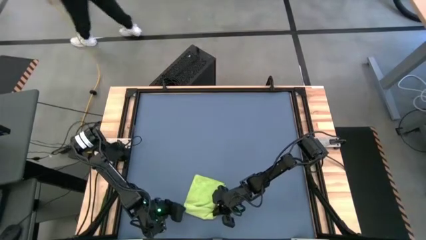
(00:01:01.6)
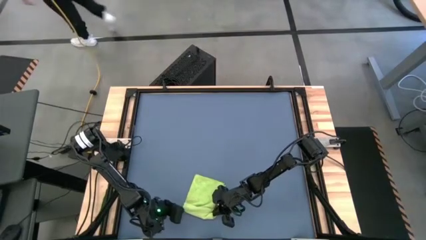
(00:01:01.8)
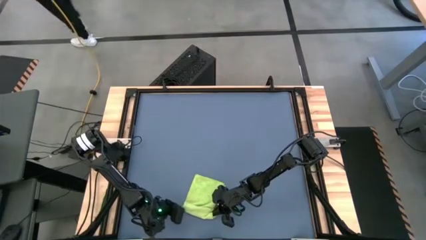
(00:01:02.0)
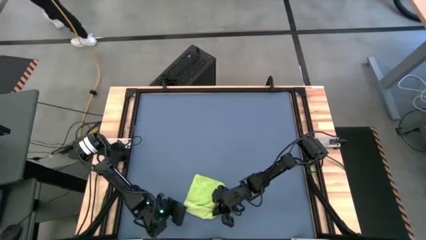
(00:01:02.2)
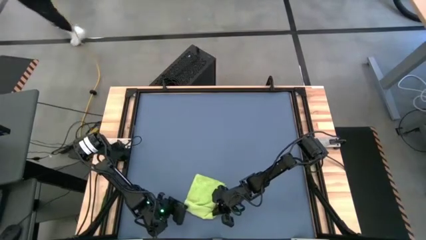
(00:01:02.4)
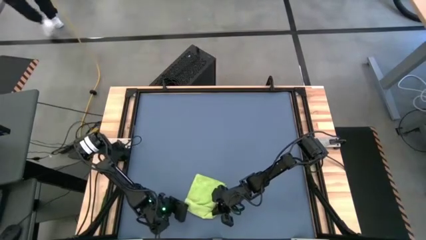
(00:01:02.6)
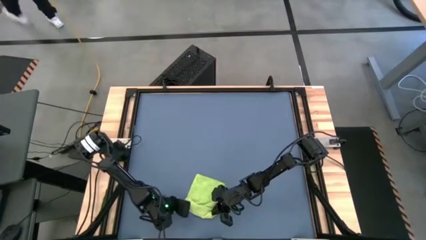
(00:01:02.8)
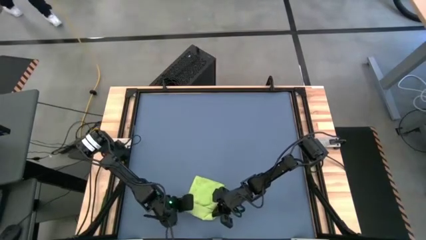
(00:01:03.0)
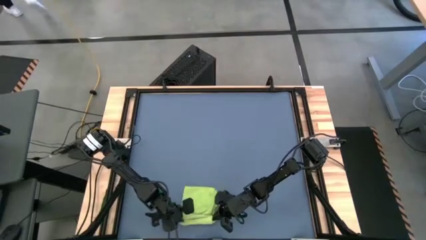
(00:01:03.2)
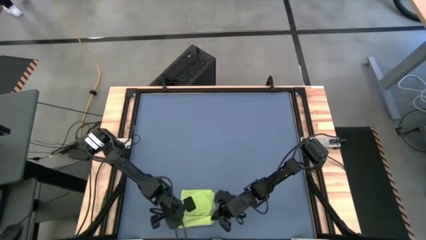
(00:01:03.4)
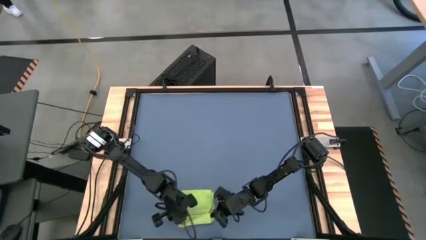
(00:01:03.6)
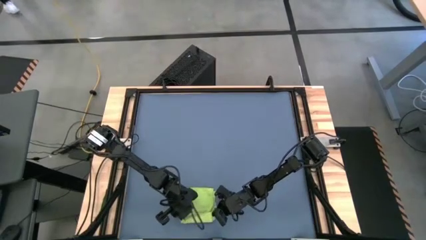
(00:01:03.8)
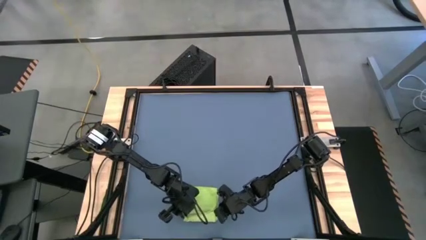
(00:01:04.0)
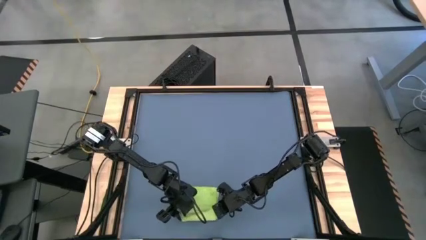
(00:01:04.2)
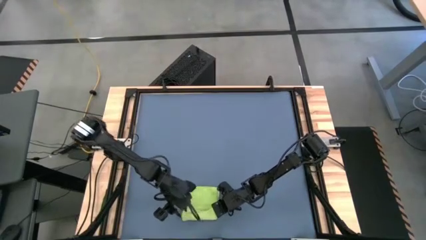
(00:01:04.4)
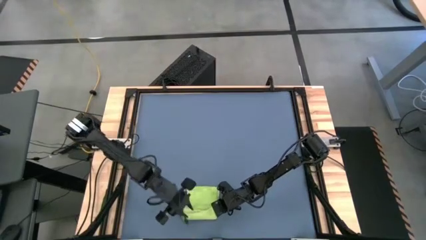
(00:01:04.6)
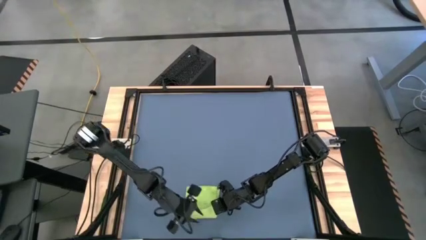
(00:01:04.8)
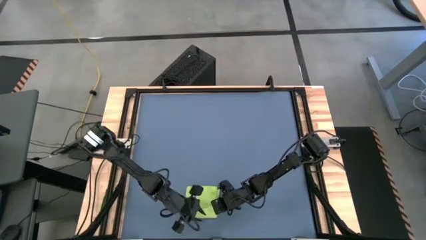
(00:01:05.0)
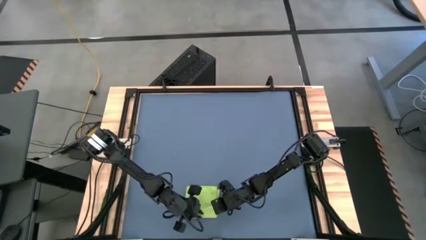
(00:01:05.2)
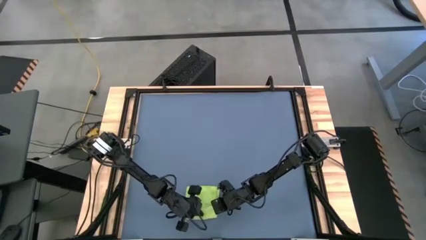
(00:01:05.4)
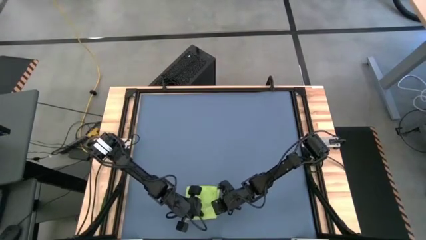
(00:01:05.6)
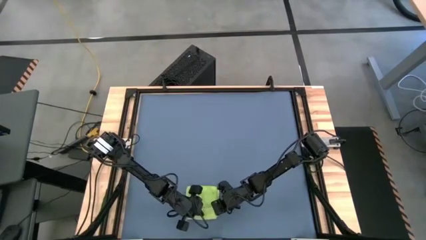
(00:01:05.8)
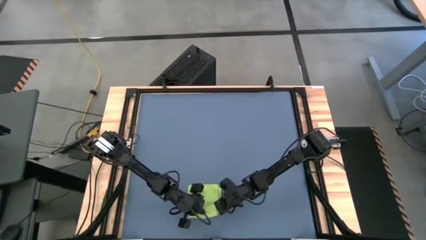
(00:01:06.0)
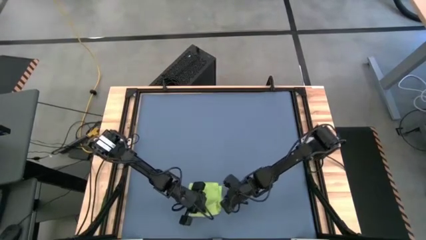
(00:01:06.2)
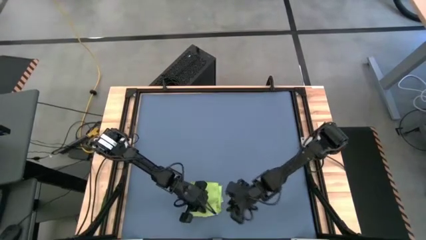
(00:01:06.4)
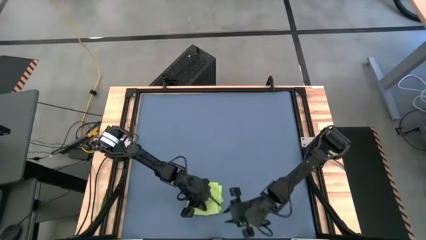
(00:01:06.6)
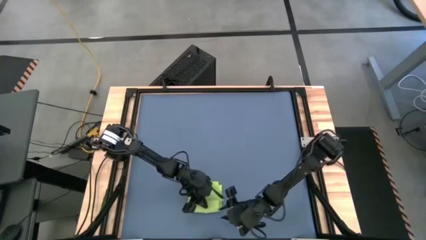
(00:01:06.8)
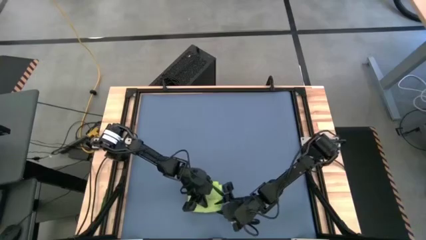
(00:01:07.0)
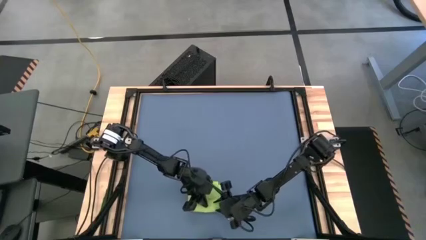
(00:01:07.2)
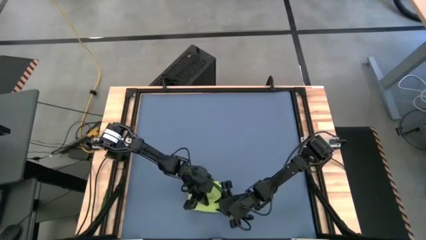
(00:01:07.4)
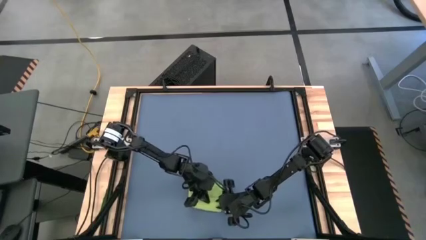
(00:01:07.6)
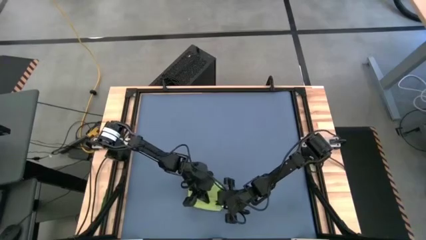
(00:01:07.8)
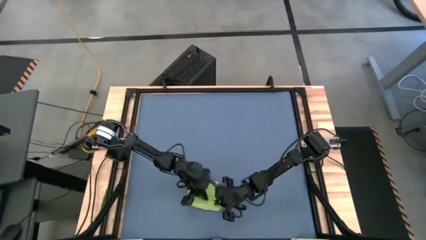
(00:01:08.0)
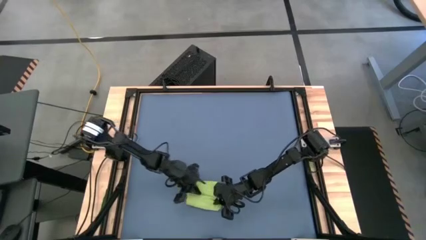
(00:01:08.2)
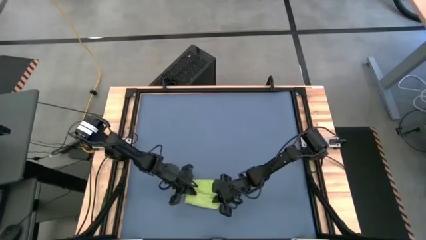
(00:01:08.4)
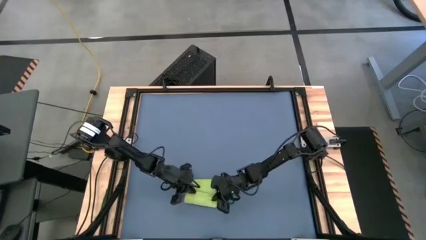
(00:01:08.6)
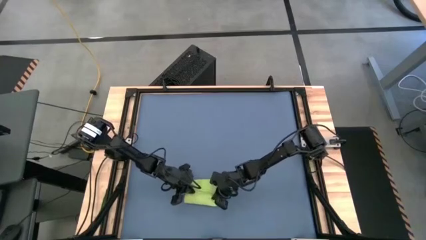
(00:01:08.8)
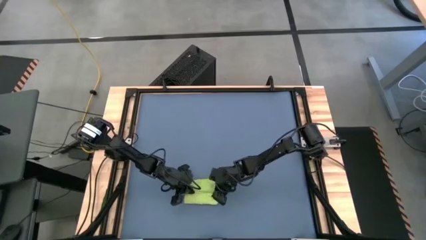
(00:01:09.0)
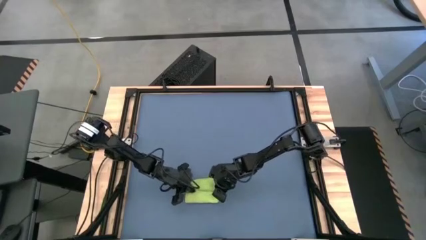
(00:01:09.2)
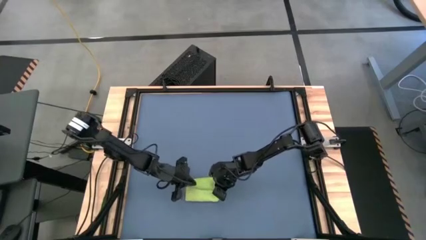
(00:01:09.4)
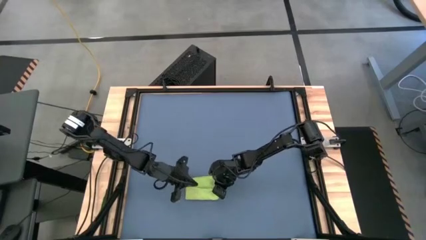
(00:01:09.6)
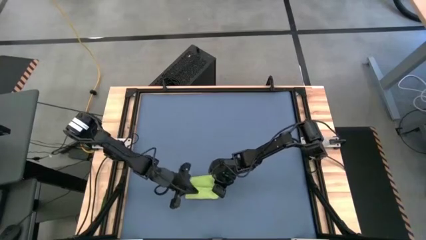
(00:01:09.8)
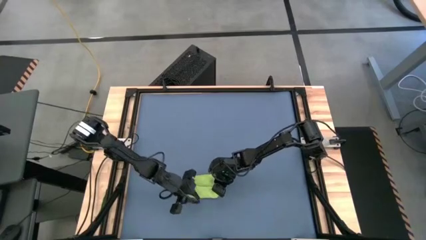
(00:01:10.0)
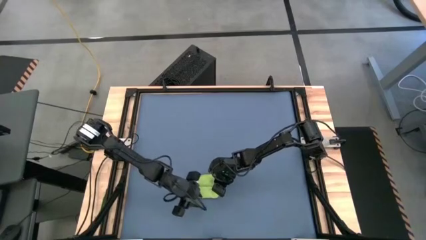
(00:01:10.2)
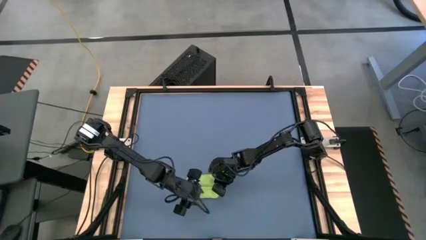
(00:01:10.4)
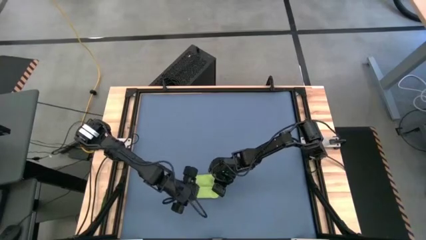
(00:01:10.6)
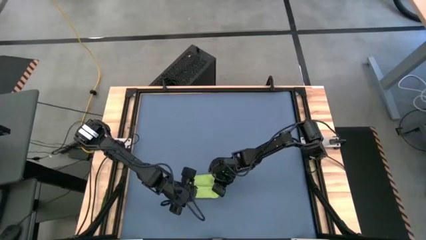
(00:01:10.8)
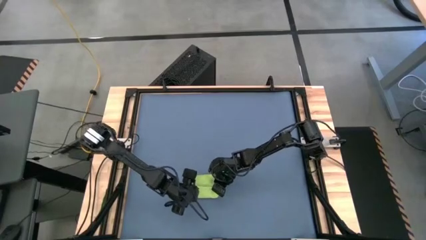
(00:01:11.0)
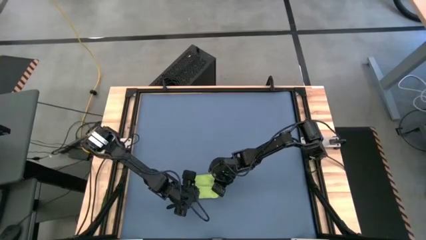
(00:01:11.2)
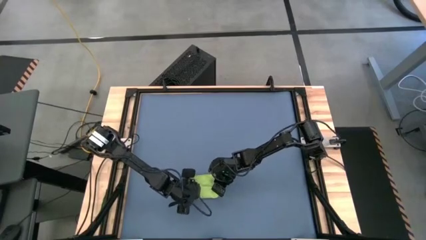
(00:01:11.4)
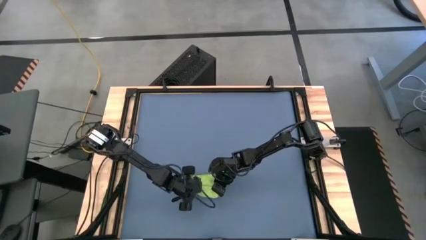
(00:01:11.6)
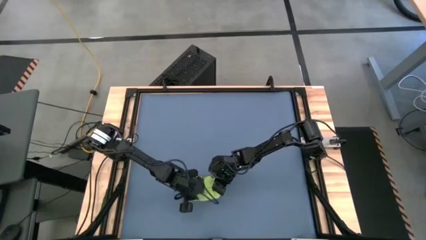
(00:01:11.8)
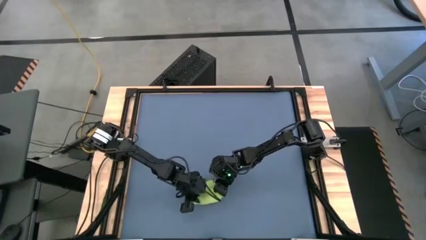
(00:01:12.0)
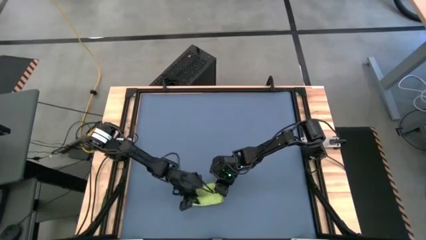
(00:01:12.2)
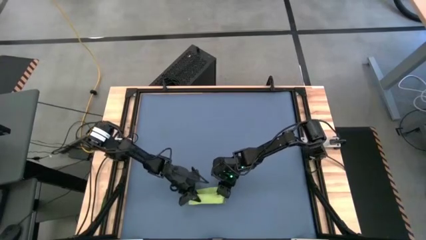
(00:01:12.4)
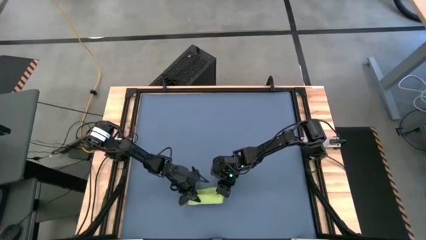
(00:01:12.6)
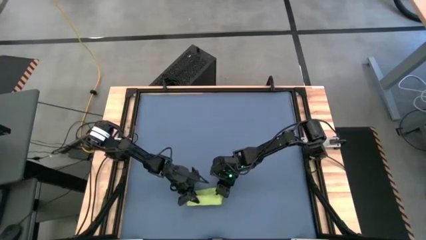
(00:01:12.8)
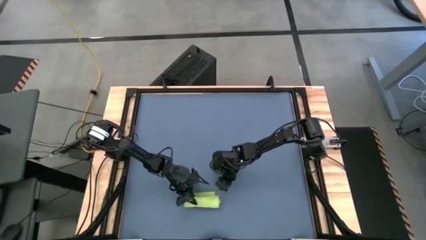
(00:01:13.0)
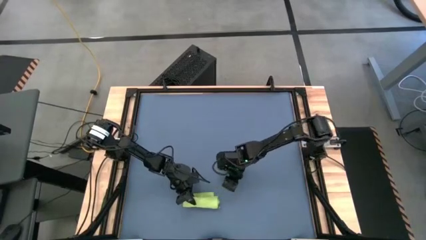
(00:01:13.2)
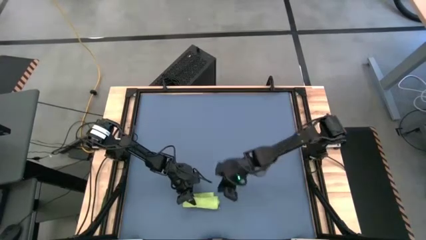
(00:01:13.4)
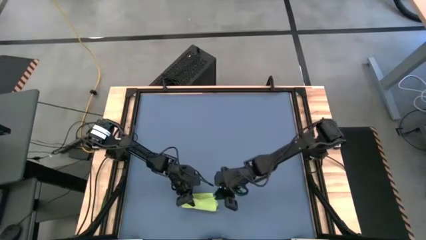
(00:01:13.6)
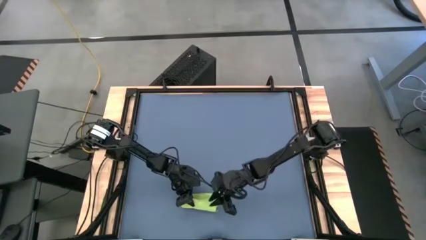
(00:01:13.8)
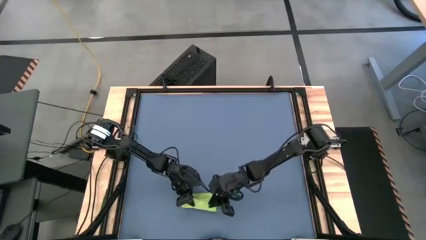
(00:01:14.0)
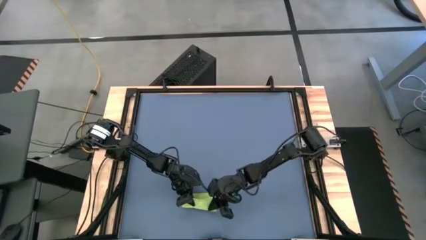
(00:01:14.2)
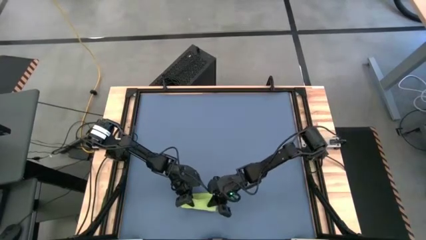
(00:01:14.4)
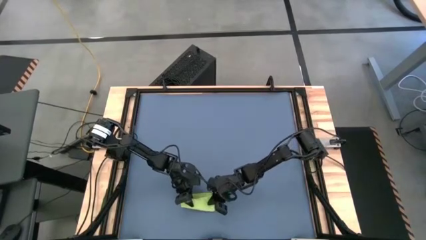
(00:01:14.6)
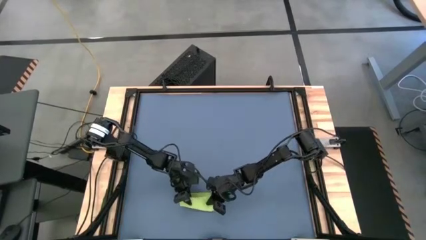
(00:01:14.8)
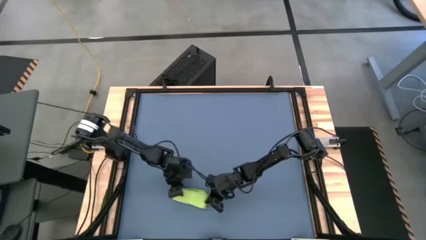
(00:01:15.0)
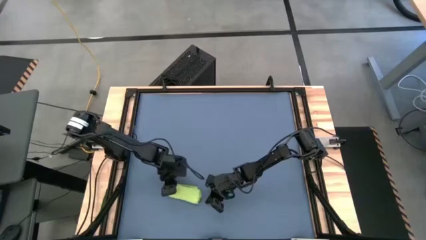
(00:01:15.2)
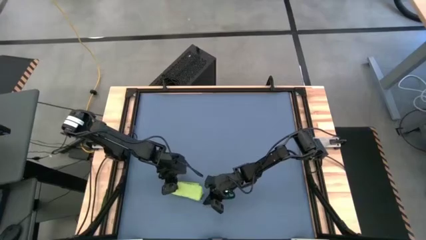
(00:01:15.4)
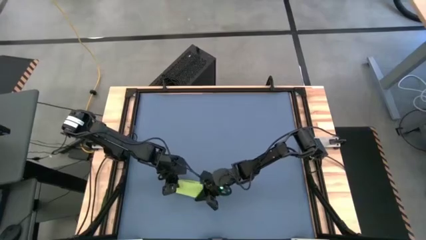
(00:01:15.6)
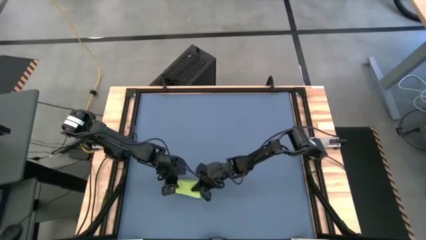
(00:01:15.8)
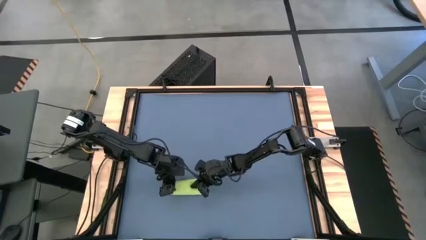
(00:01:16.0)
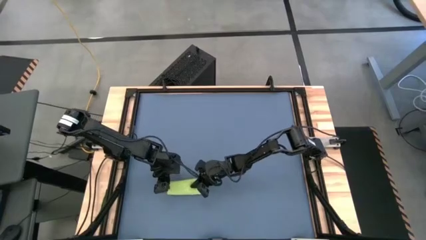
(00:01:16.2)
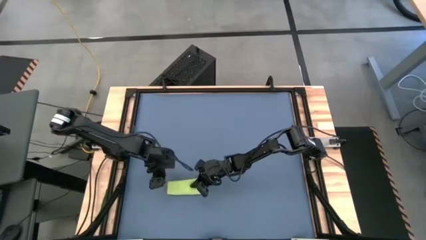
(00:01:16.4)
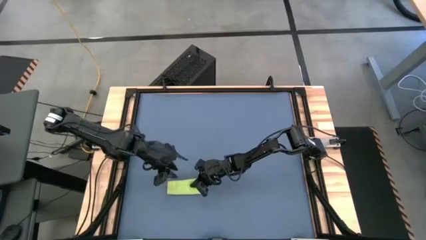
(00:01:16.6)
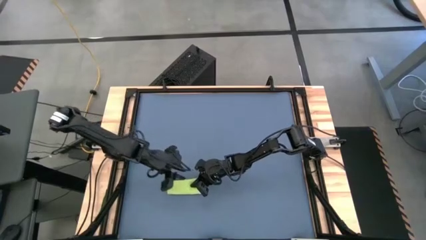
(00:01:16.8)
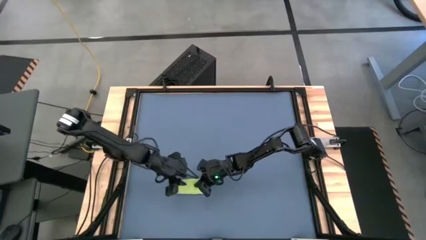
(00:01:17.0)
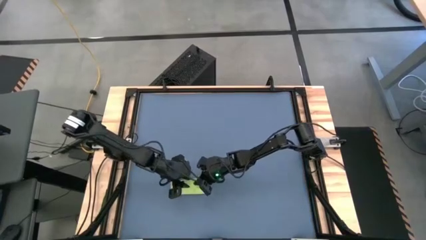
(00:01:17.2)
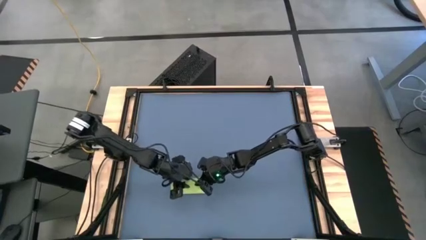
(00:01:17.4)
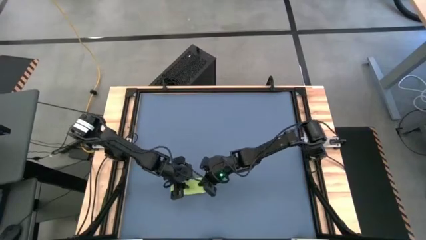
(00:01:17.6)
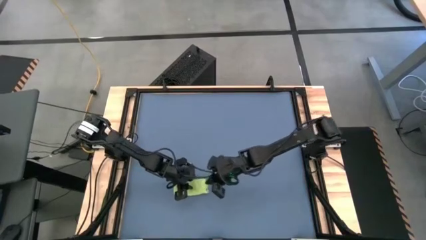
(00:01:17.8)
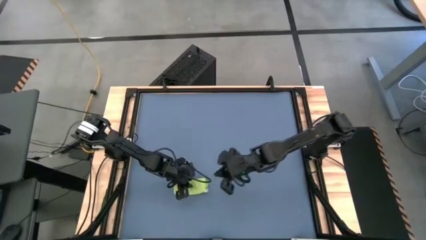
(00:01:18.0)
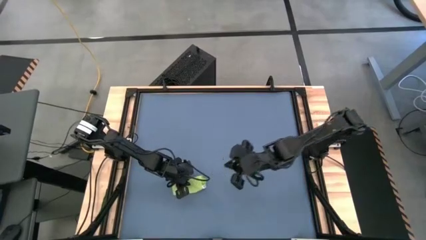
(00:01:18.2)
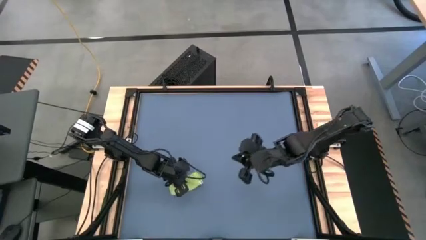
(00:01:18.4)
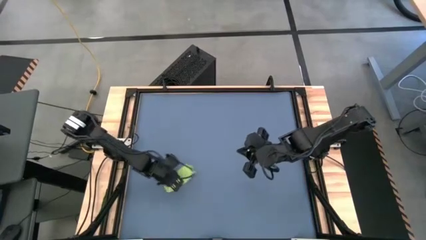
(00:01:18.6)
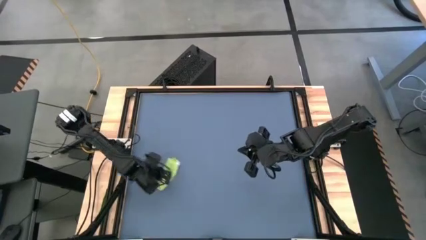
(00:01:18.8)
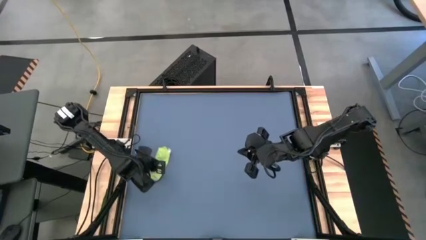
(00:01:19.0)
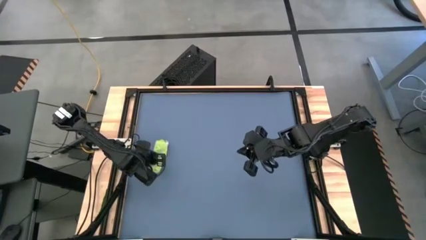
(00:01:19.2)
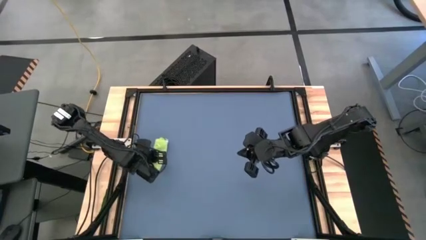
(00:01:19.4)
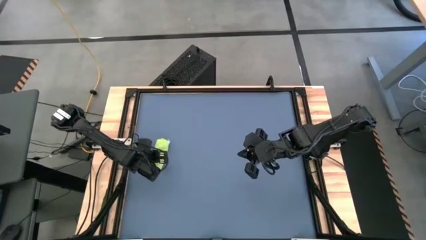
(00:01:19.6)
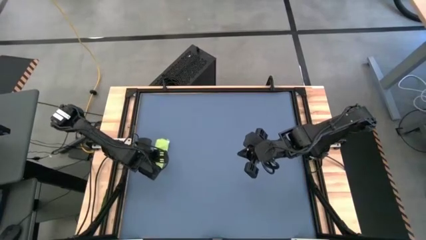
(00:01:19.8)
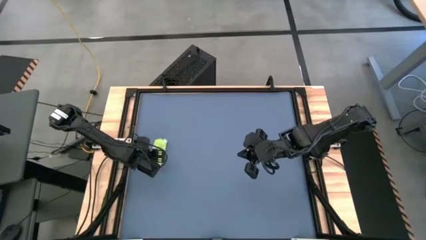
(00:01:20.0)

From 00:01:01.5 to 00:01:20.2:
Task: Roll towel
Roll the green towel
